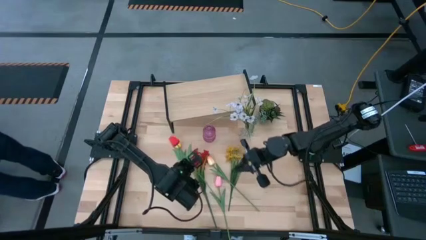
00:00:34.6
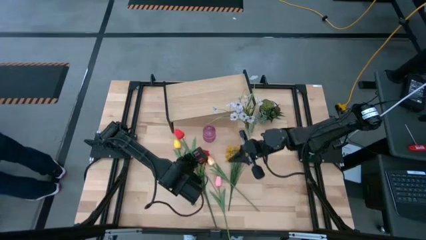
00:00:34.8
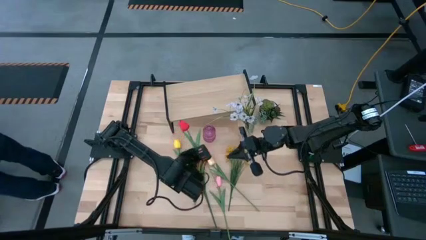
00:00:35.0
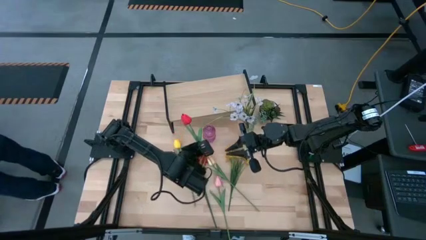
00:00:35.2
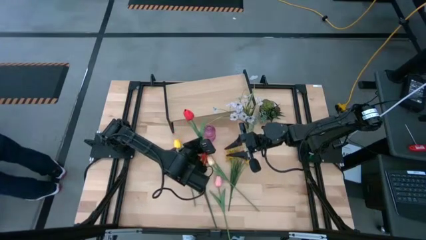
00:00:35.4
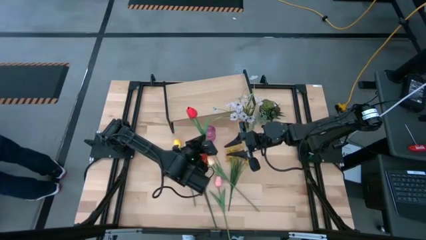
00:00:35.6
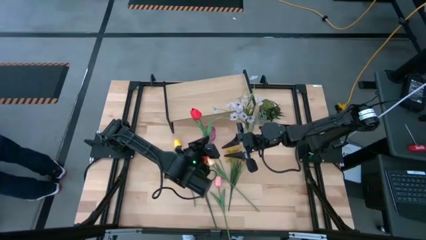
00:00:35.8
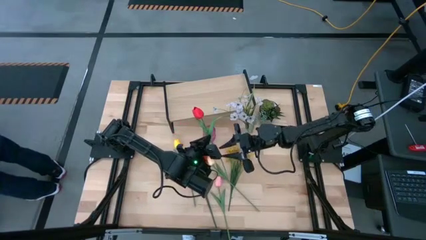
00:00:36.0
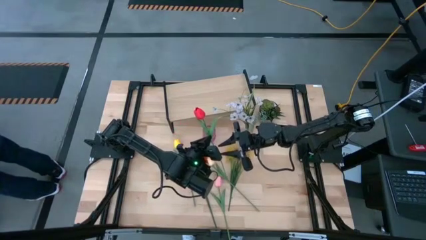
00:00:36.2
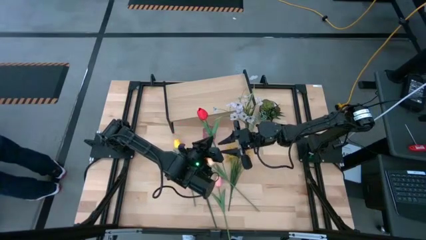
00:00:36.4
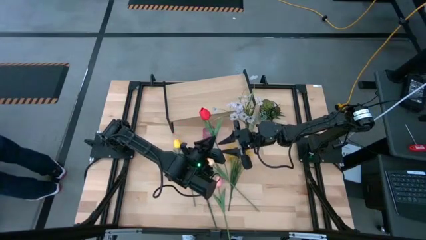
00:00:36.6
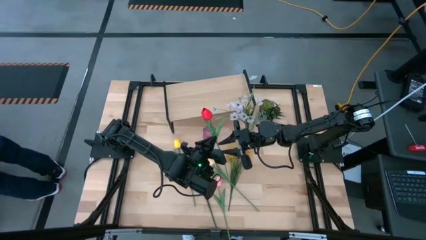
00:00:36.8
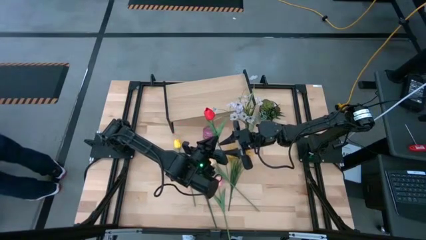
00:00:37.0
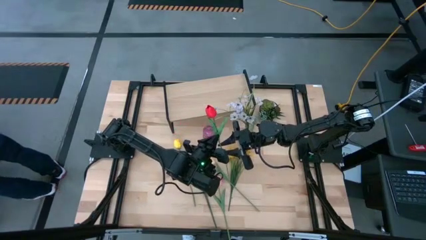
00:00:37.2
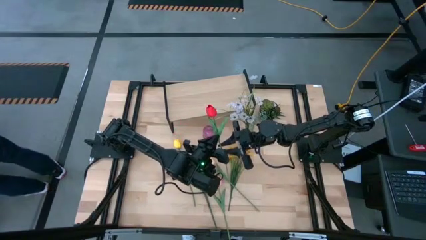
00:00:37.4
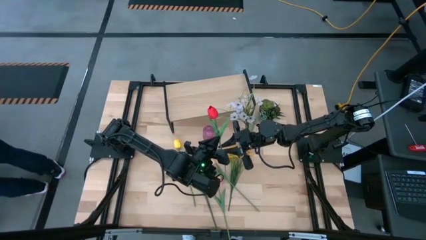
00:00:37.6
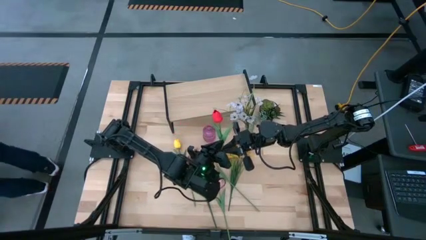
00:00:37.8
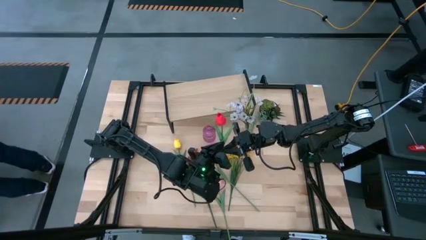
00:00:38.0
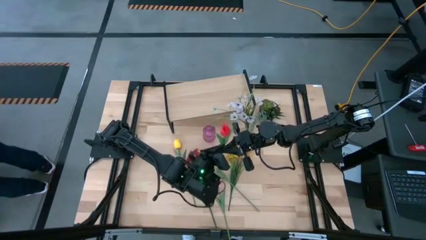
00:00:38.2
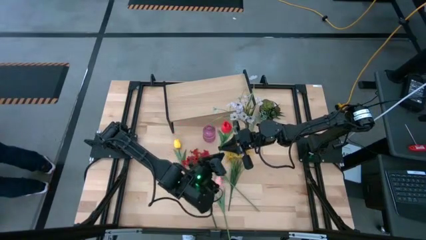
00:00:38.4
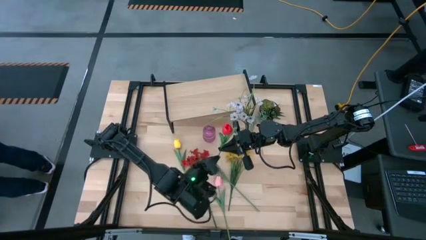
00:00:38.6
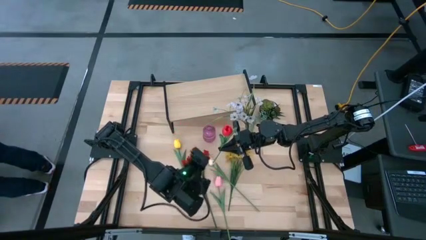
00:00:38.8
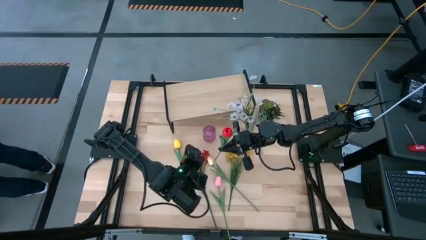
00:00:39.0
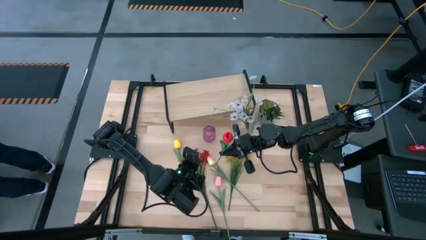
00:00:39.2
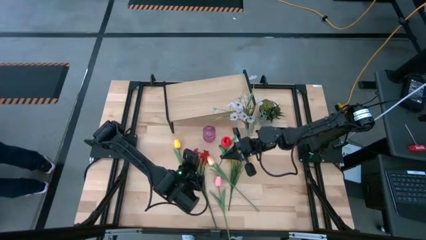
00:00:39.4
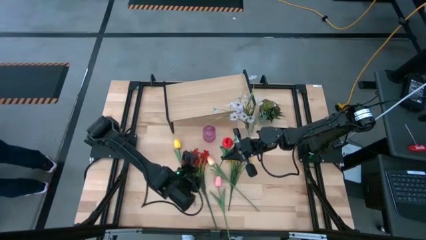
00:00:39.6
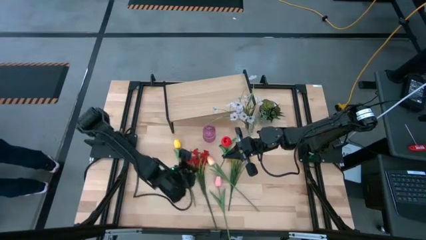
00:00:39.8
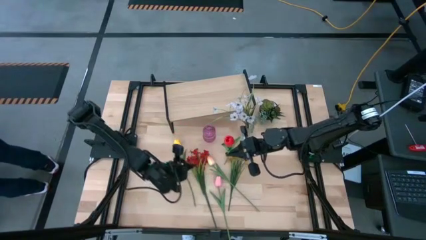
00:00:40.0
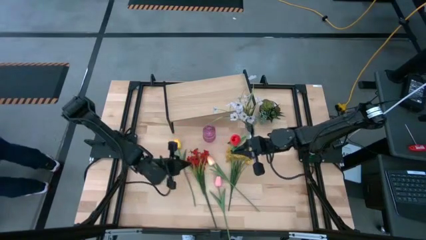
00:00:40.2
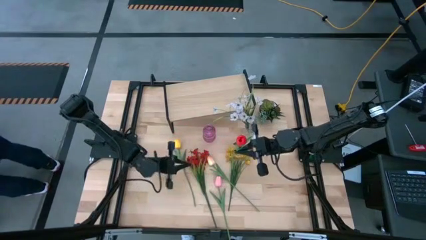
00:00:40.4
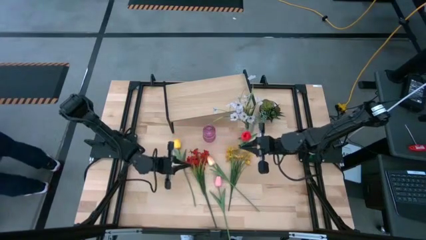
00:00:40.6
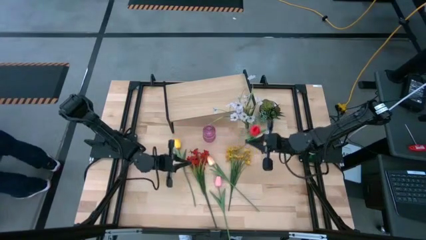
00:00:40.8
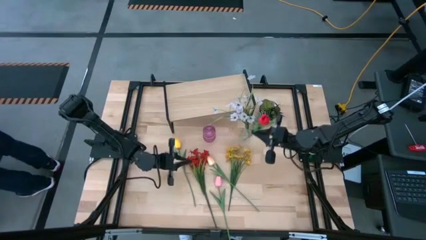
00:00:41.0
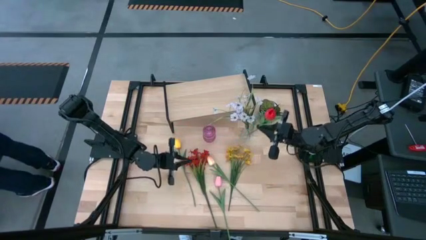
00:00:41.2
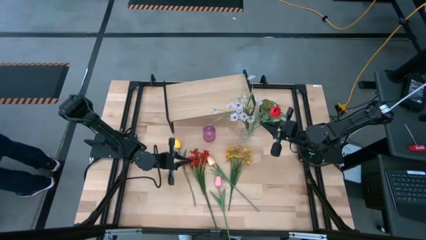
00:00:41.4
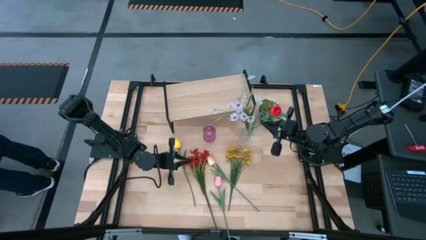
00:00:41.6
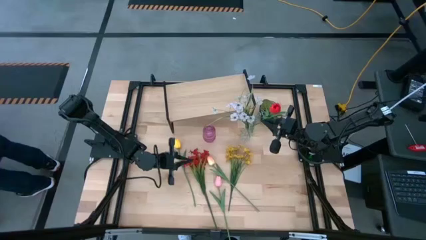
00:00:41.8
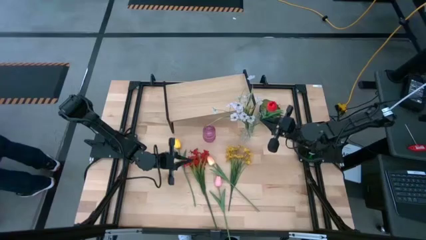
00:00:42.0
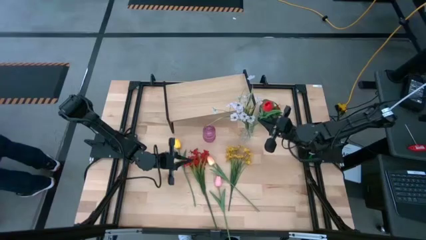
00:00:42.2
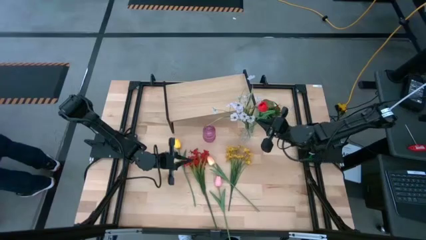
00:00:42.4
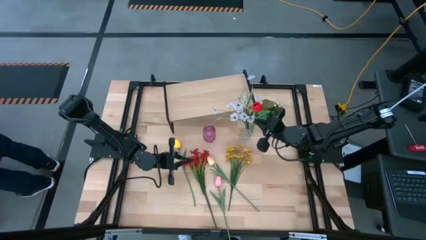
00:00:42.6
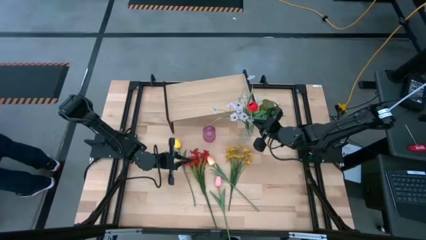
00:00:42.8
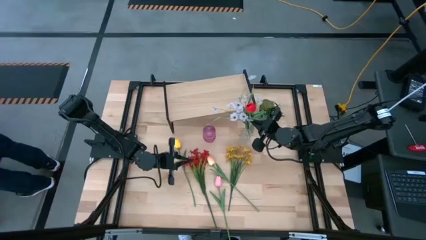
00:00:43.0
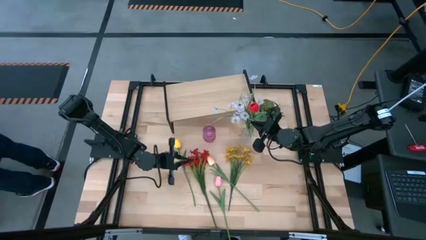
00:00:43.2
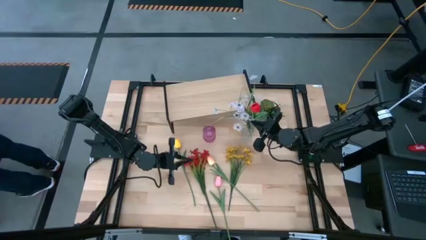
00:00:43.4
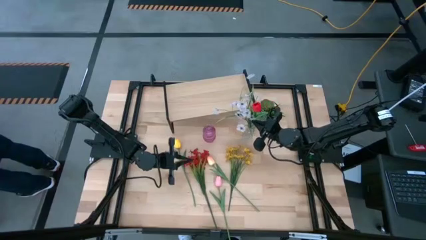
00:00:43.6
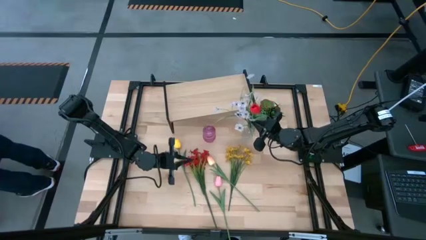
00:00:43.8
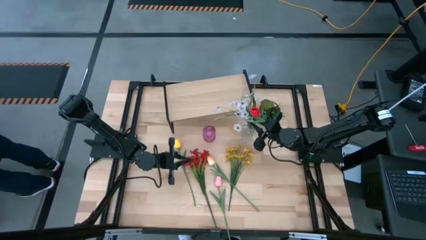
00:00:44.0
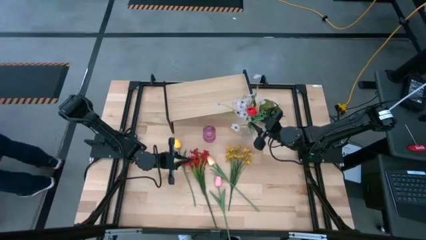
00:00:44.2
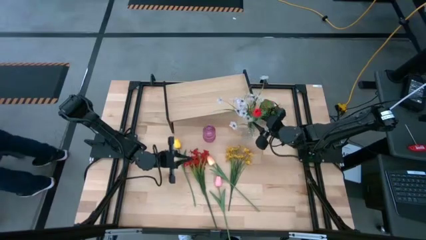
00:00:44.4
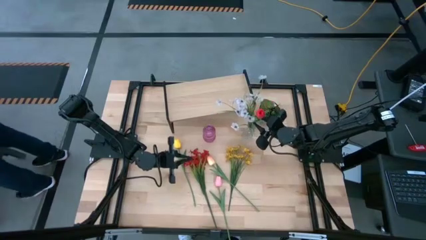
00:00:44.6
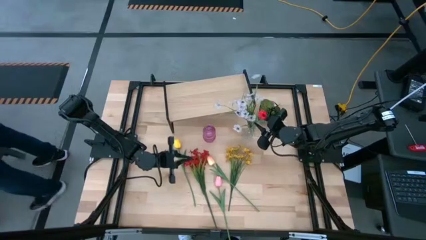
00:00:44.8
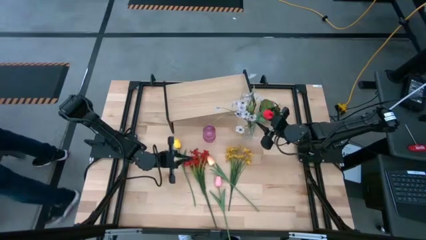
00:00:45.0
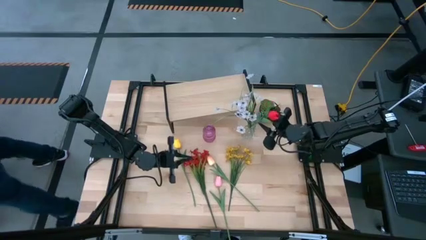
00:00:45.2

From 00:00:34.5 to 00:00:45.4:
Task: Pick and place flowers into a vace then onto a shelf
Put the red flower into the transparent vase

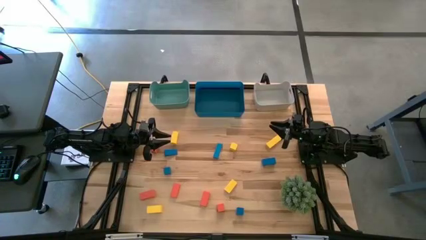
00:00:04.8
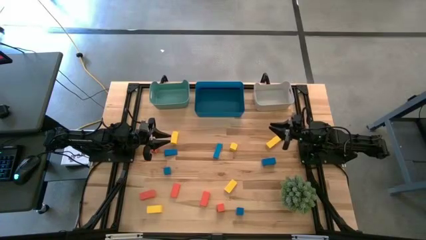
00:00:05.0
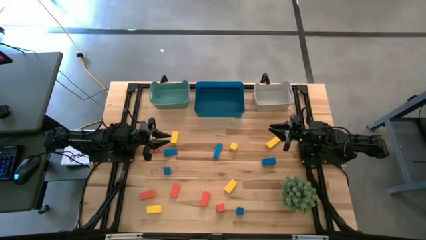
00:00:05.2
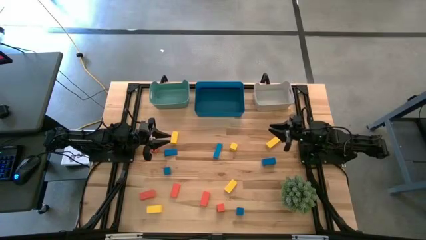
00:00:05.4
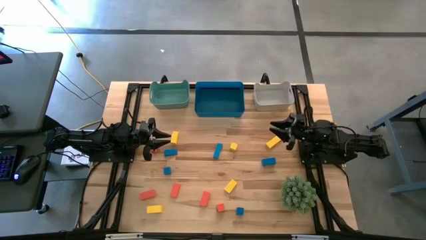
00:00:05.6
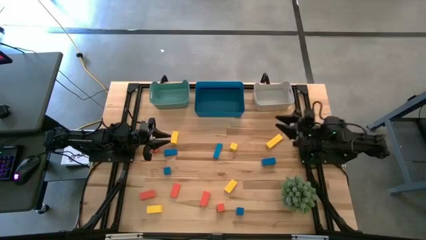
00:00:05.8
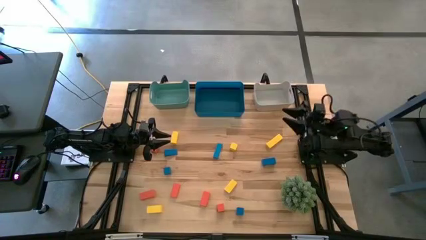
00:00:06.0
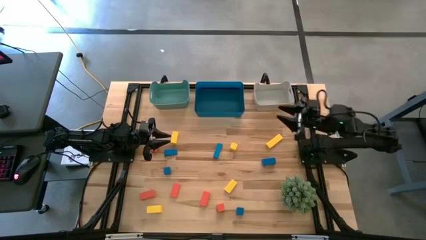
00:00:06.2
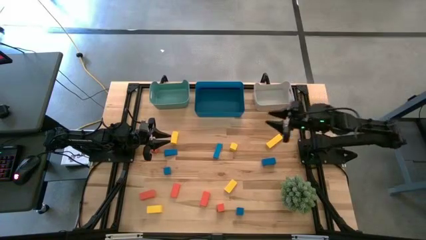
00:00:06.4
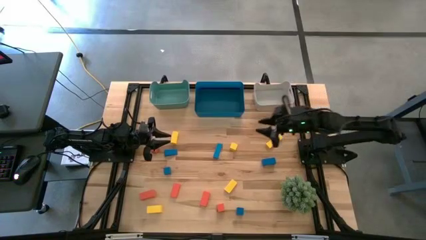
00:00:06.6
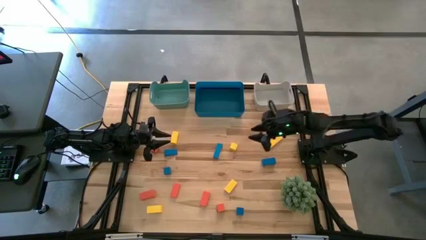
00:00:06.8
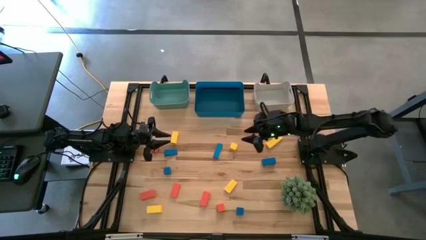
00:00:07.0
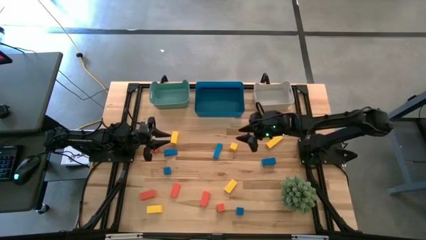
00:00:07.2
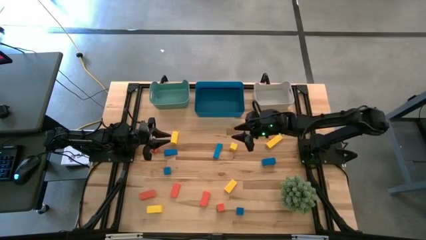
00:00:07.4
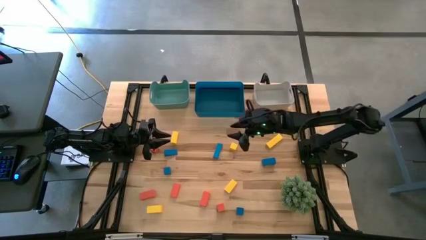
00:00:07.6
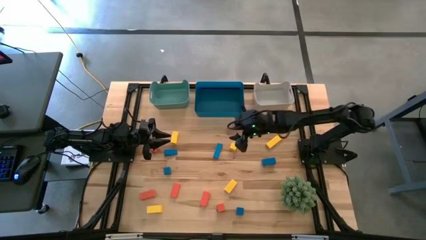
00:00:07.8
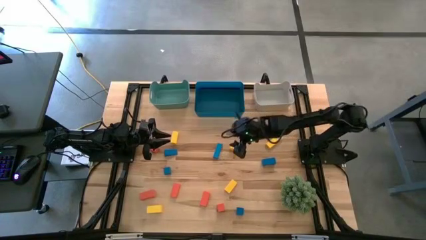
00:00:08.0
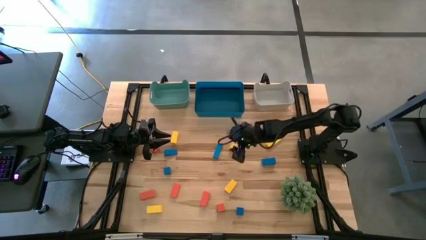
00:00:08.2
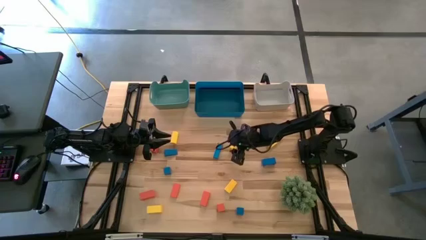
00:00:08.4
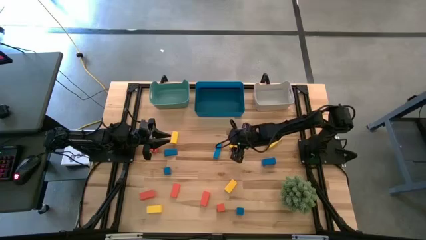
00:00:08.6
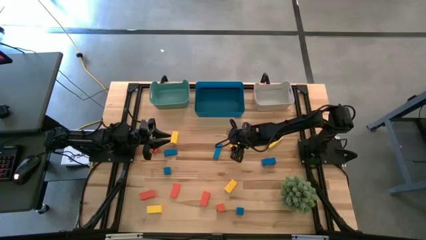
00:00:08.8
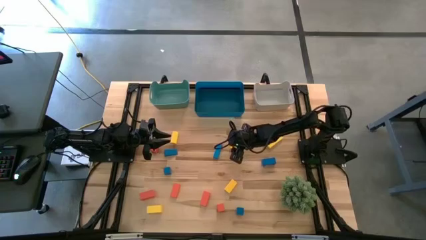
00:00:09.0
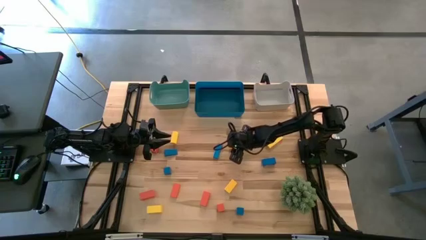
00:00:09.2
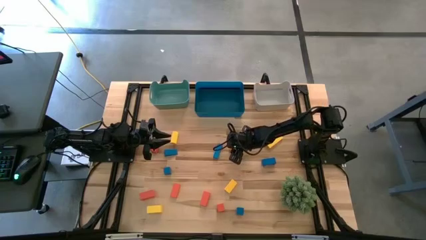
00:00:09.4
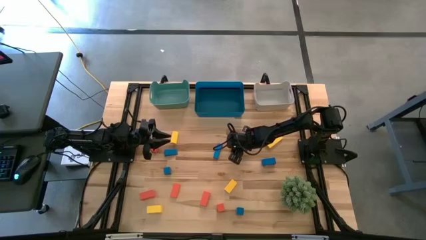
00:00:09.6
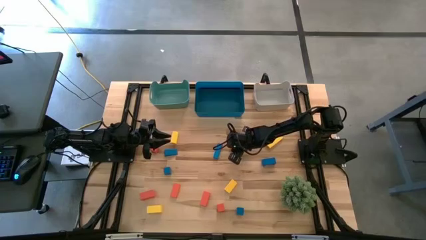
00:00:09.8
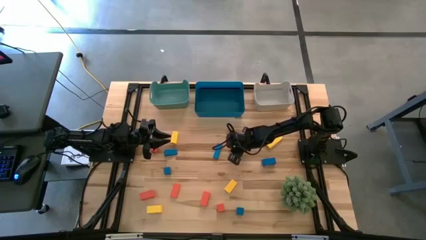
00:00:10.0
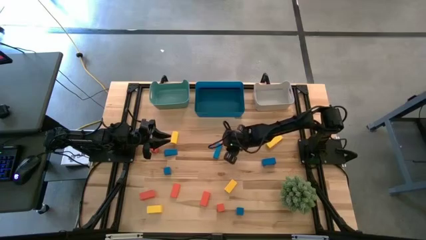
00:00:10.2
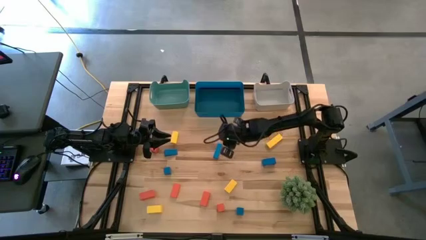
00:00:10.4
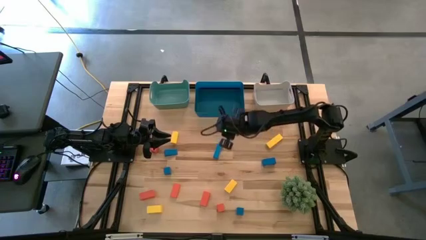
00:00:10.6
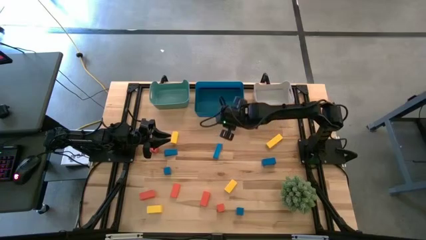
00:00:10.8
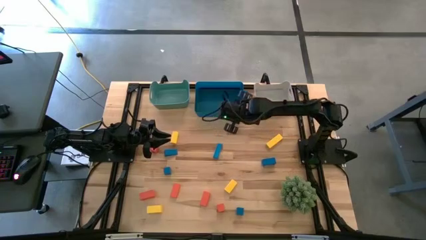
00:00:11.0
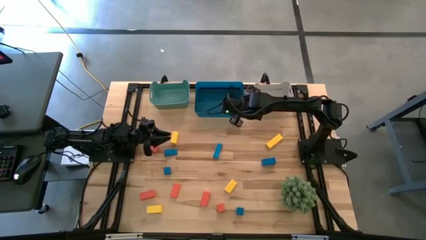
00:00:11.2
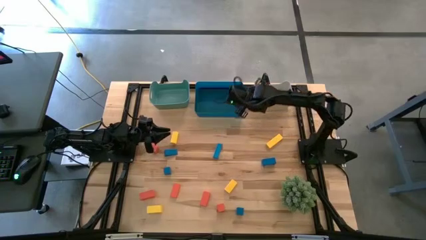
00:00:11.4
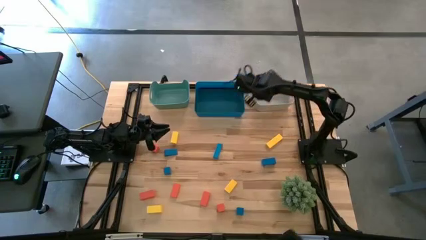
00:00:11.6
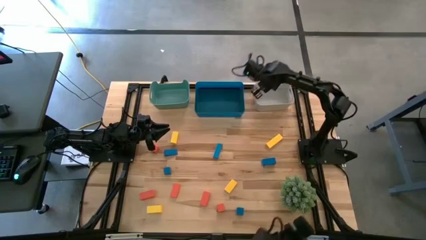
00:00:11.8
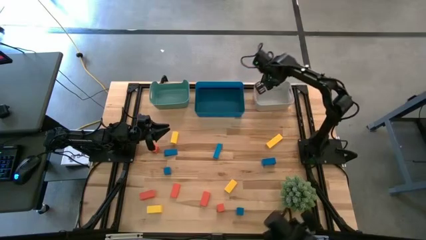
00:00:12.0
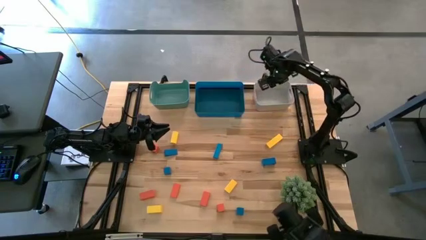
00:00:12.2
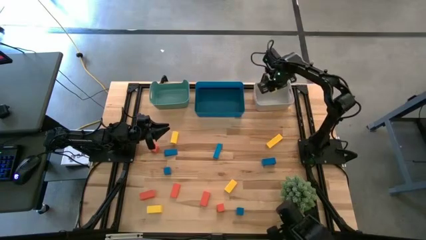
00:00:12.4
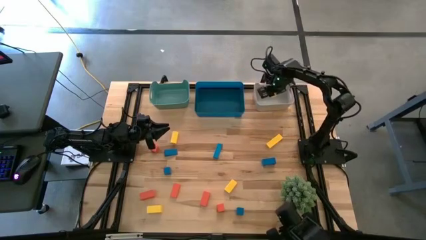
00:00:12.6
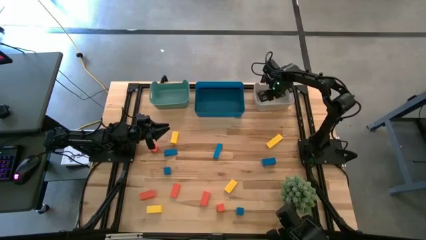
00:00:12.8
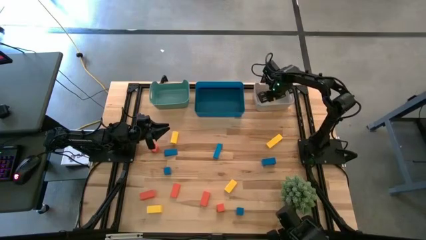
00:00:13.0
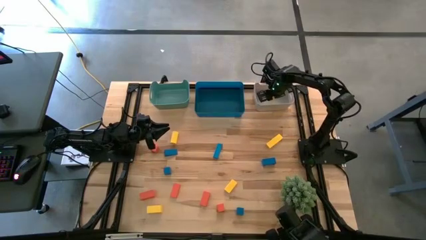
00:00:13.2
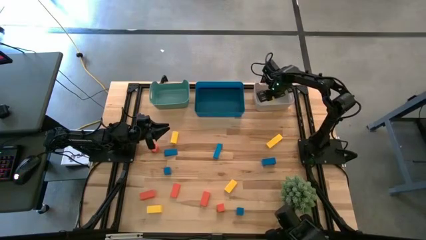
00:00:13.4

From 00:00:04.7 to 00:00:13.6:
Task: Sort & place blocks by color
Put the yellow block into the white bin
